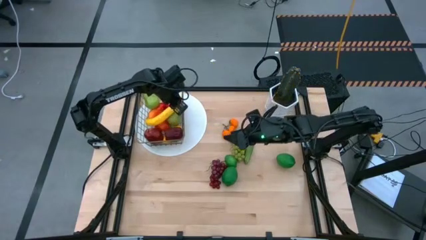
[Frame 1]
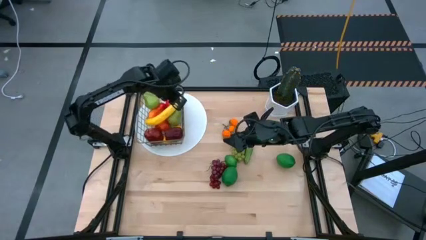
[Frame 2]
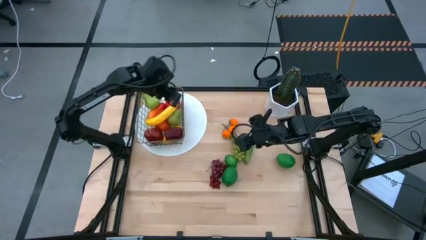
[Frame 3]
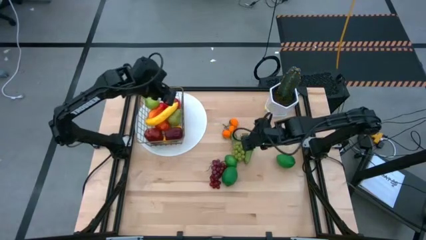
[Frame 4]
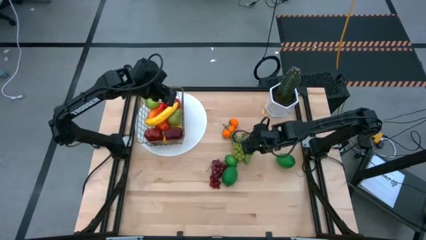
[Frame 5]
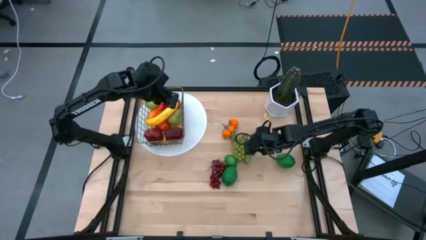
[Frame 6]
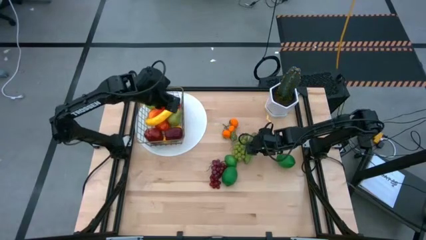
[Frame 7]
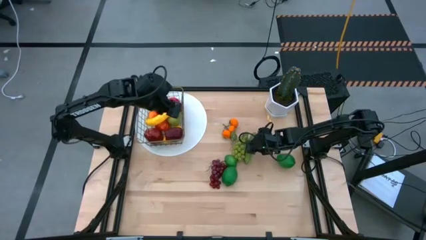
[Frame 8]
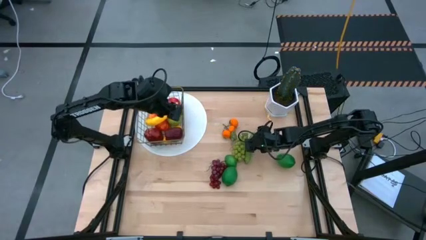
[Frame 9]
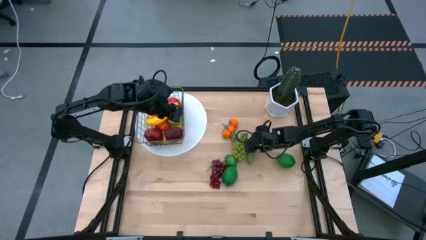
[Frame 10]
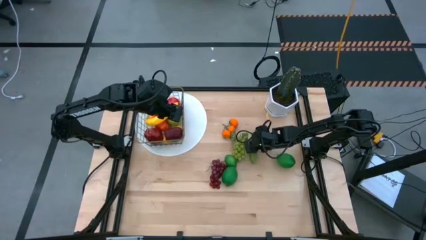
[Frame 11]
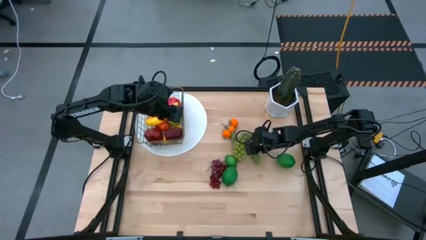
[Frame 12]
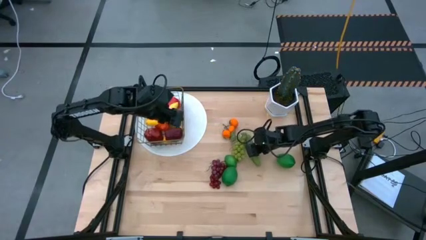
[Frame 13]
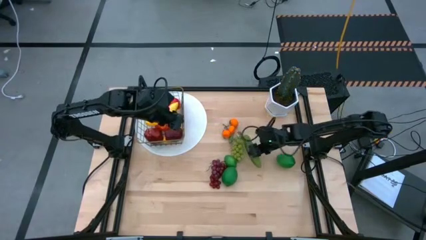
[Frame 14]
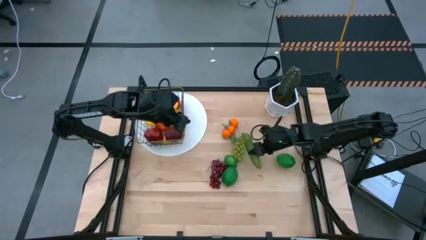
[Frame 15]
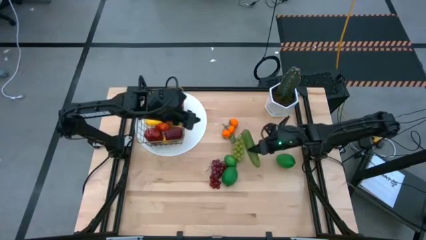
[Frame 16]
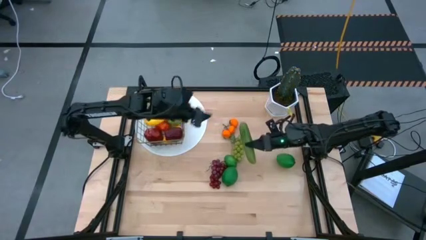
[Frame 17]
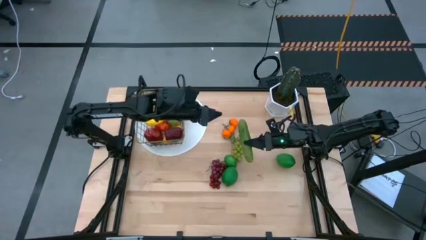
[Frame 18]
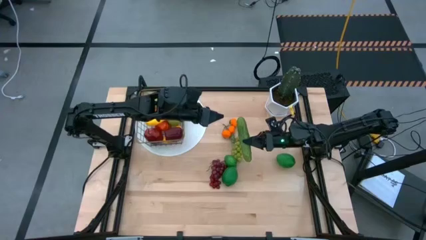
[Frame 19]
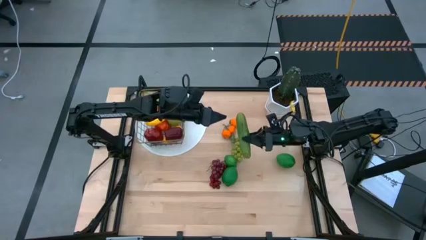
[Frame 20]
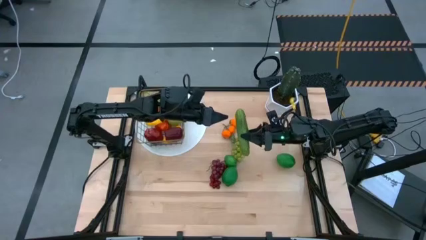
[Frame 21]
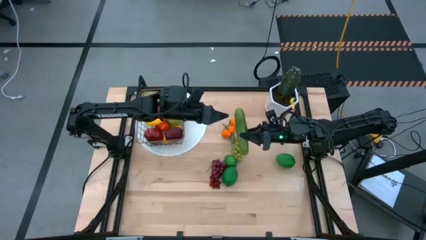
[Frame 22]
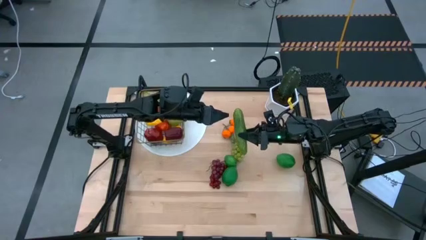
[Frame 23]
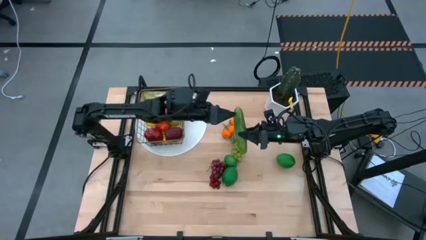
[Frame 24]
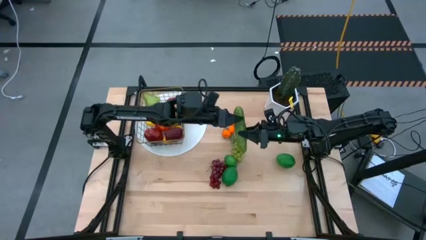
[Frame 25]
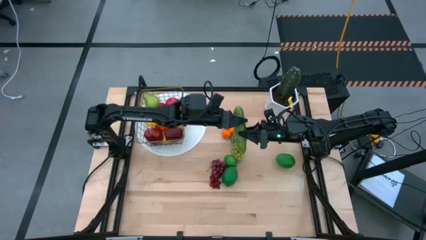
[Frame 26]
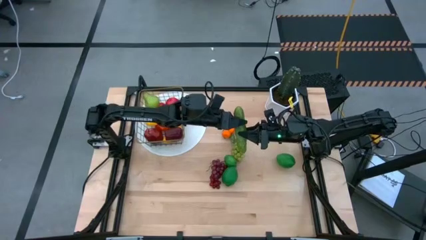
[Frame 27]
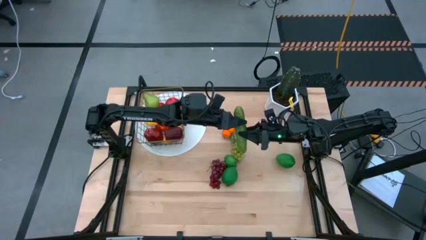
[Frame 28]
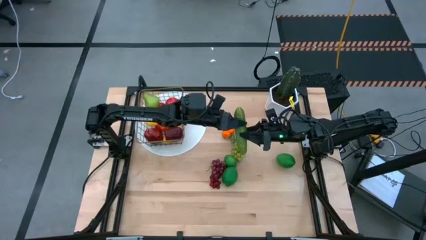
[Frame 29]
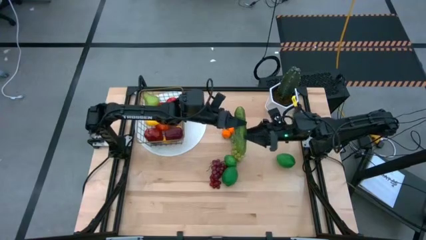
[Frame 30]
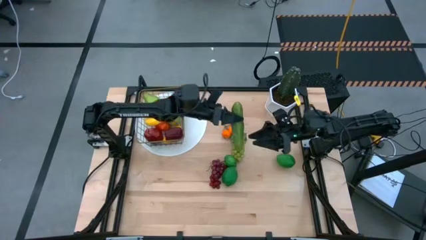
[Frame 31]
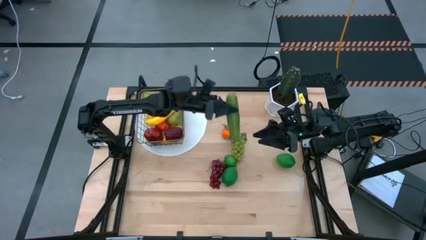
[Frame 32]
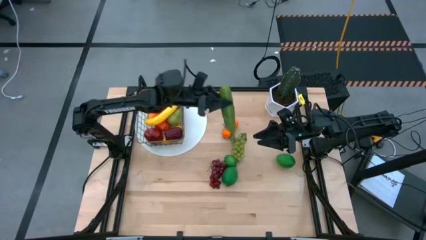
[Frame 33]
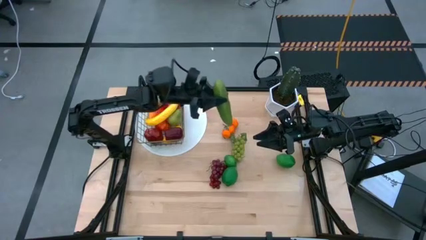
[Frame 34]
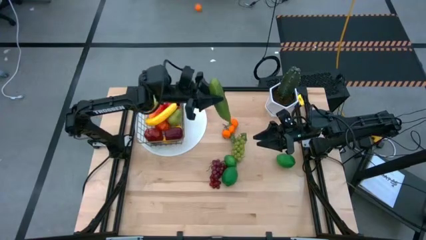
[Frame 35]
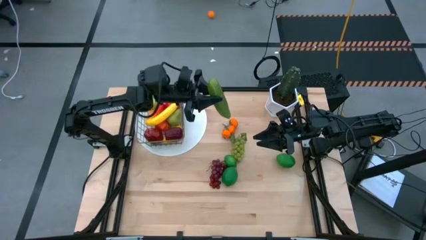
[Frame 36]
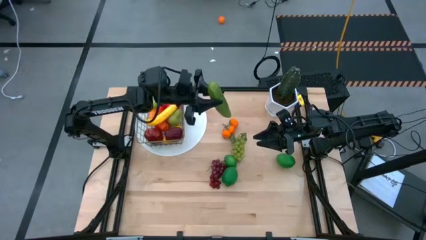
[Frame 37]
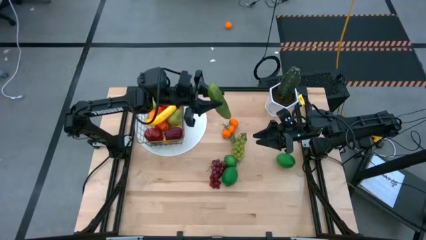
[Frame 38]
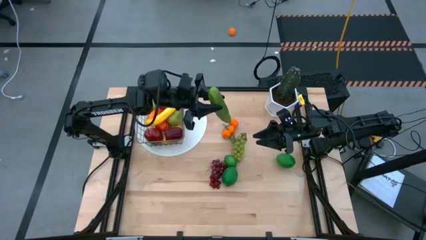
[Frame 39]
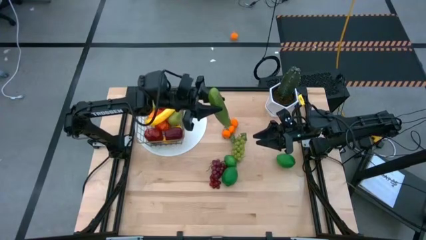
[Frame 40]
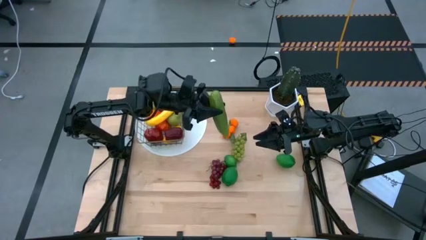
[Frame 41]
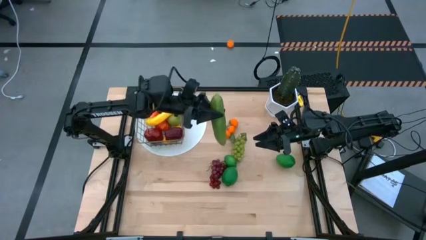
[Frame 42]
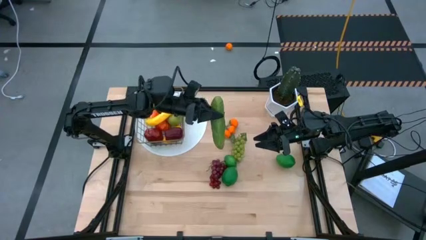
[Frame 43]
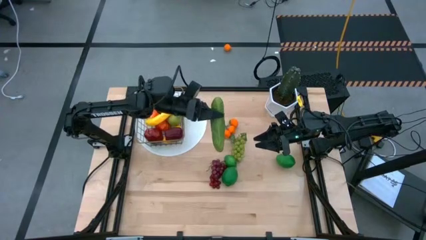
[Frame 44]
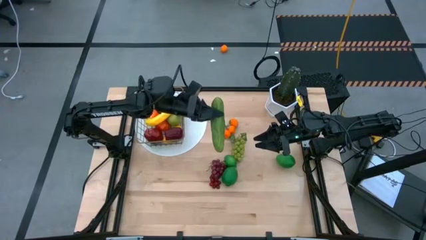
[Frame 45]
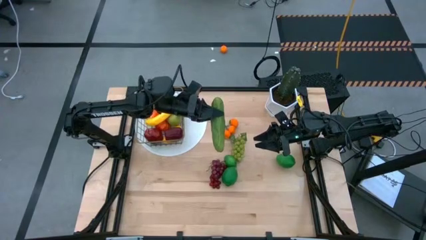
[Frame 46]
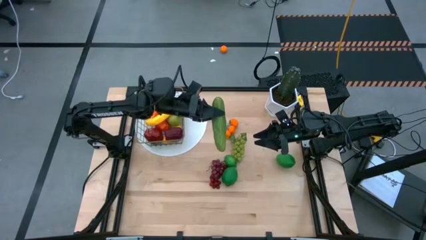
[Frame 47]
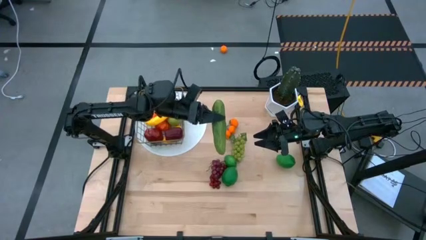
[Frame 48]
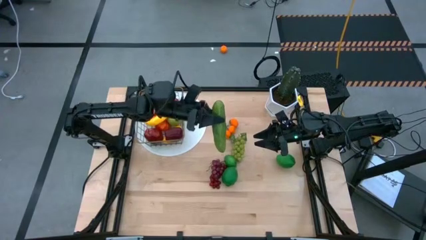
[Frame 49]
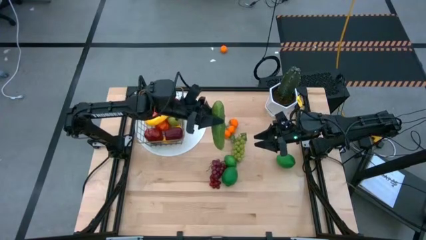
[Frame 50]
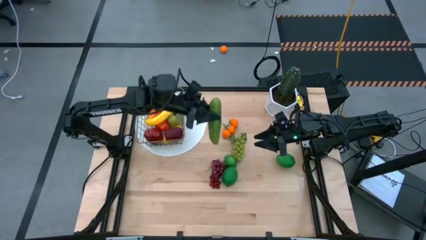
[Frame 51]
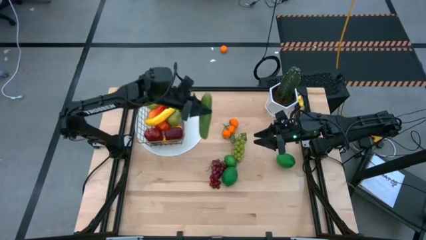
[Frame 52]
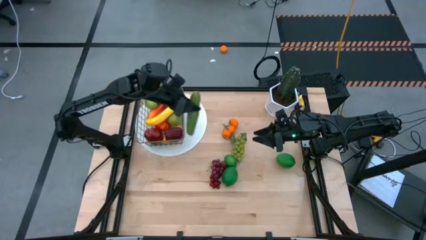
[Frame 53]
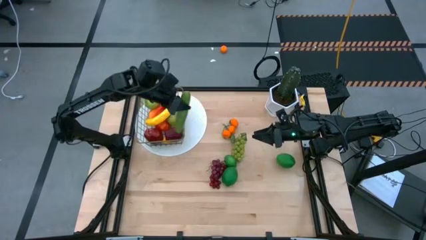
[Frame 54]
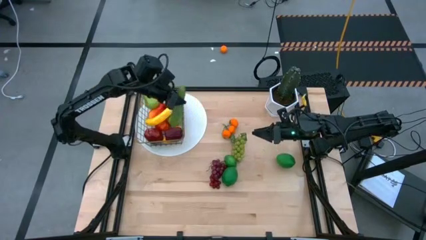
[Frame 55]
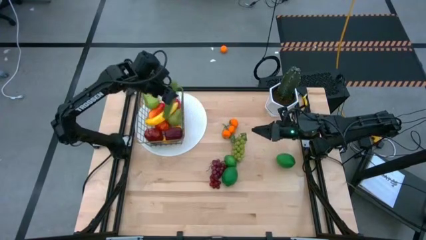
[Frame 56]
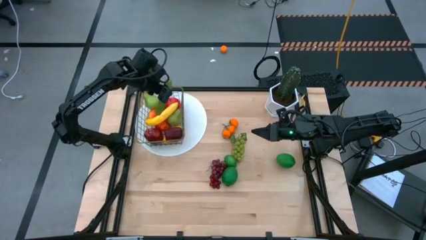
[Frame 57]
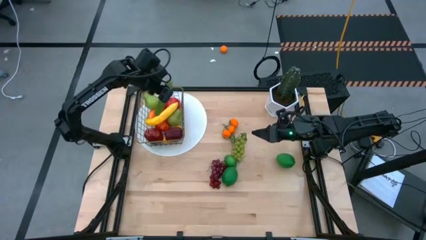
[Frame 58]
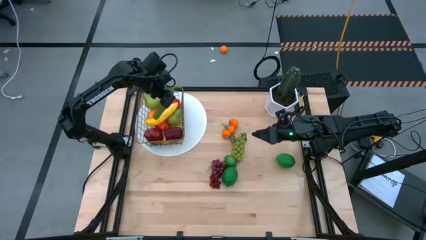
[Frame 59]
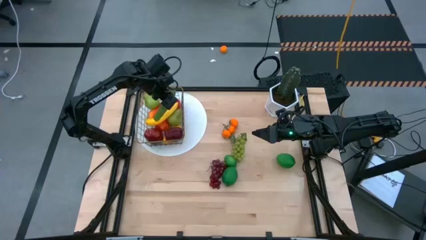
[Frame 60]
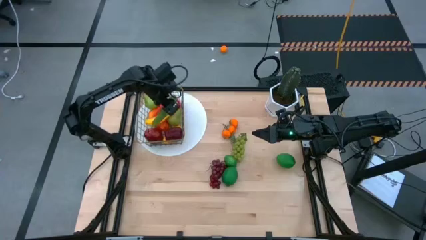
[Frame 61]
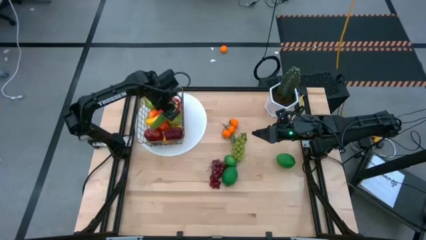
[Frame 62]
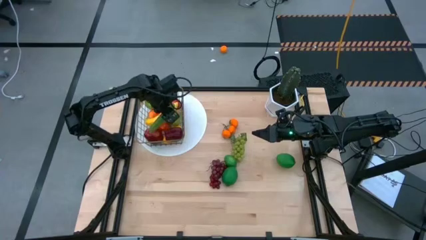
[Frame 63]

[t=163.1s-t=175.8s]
Task: Build produce basket
Put the green cucumber into the wire basket

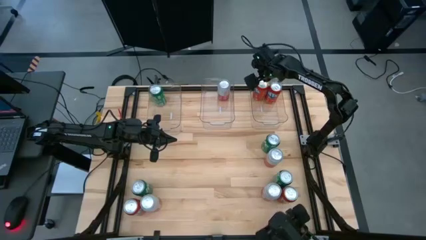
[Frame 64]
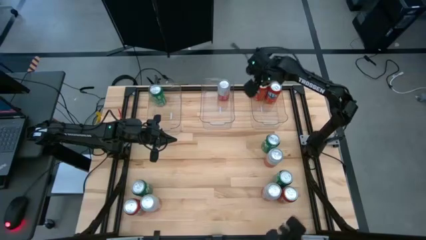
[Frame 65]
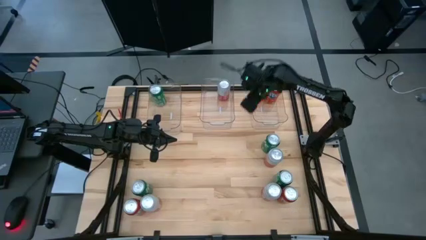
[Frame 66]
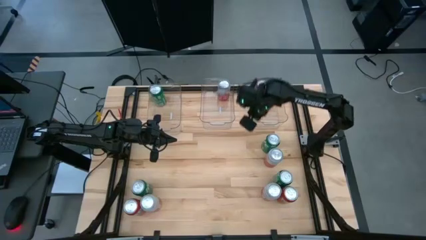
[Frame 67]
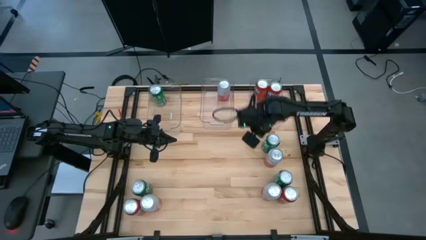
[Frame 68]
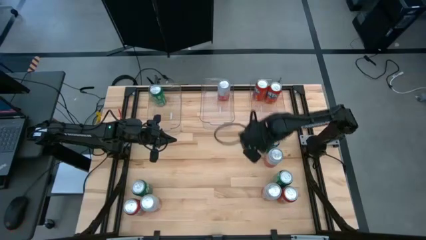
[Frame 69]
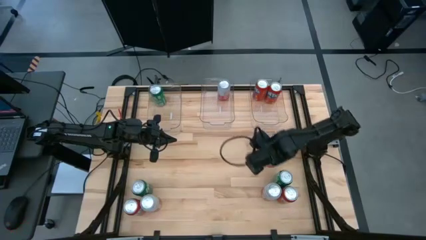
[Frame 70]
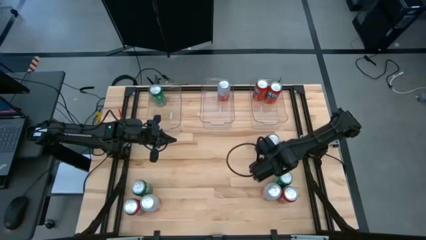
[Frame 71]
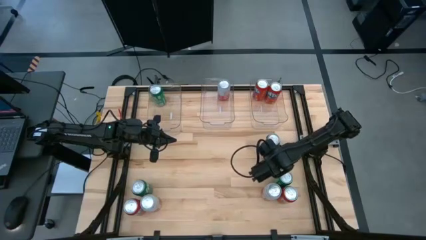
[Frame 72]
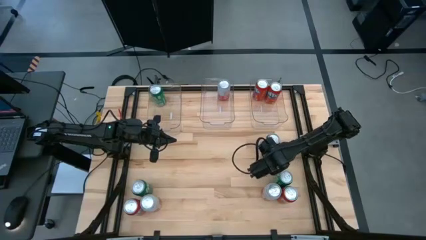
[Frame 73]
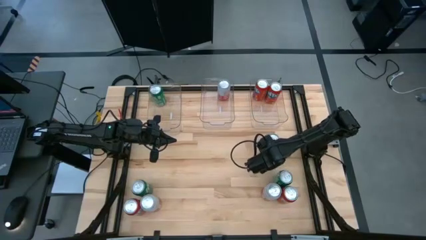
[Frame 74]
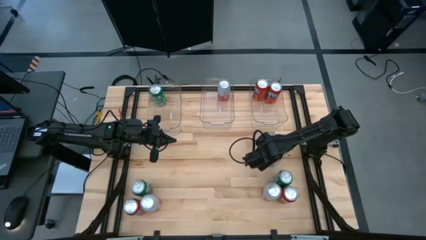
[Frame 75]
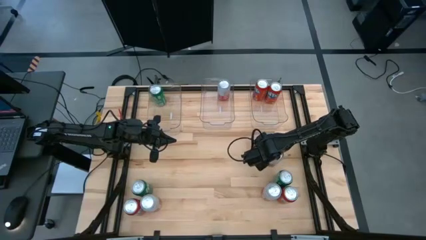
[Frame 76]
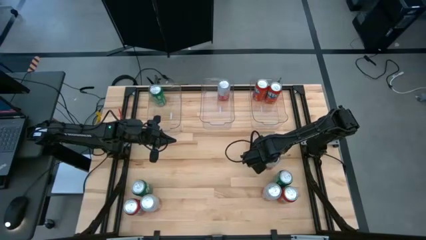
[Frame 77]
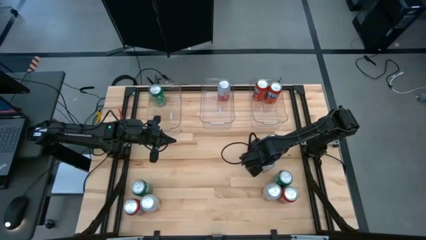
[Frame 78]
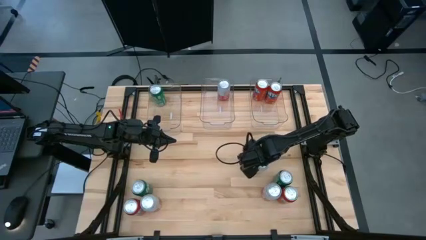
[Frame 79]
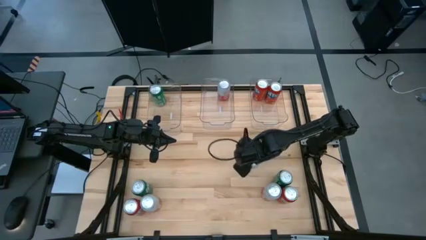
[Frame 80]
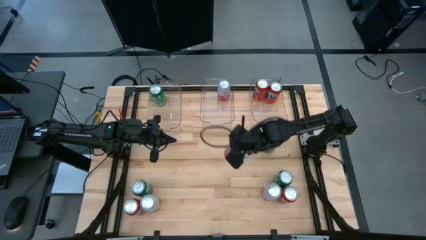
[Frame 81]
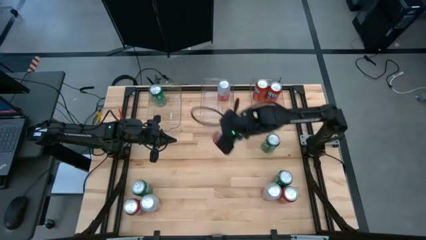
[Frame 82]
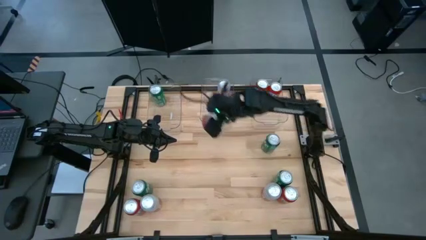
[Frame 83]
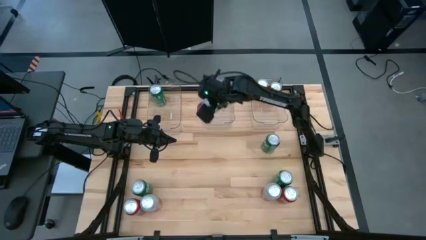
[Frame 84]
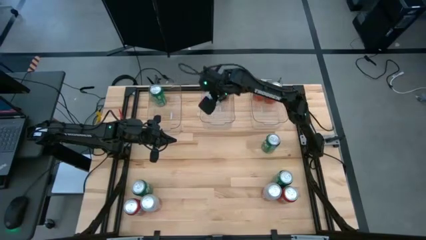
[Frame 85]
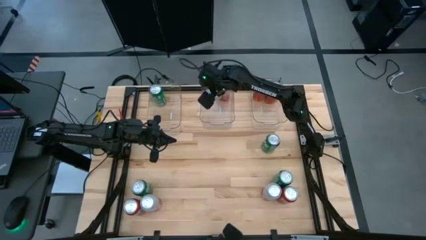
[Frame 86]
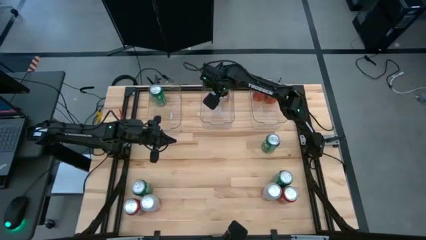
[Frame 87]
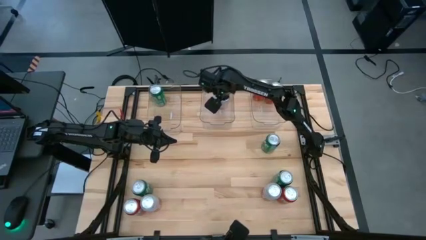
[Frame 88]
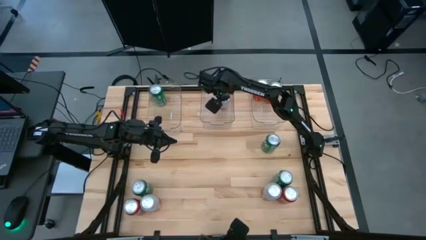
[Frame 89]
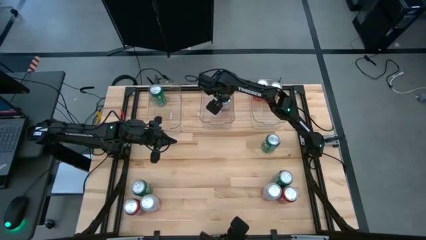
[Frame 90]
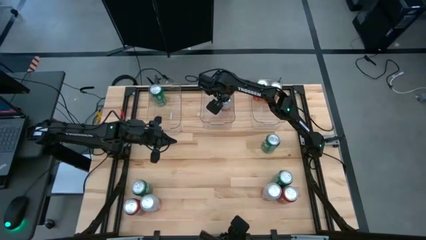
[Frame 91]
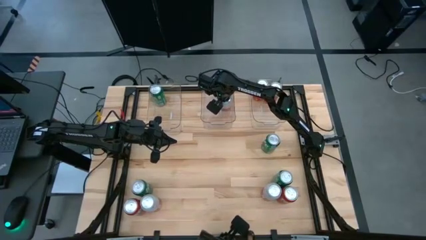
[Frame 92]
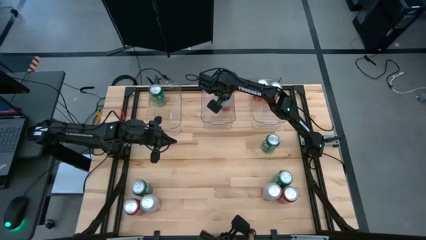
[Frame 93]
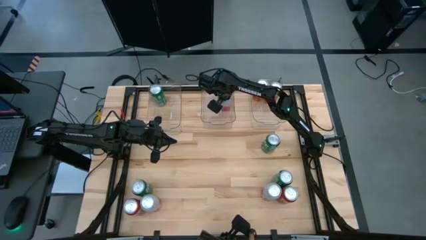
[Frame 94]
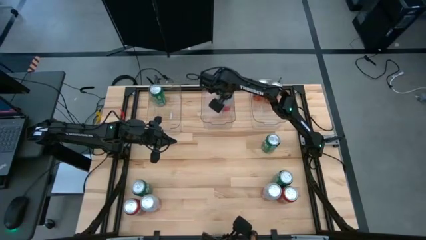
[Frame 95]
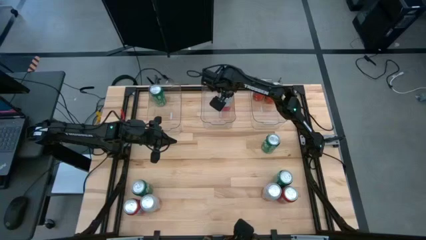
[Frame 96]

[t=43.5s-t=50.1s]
Task: Sort soda cans
Put the pink-white soda can into the middle transparent bin
